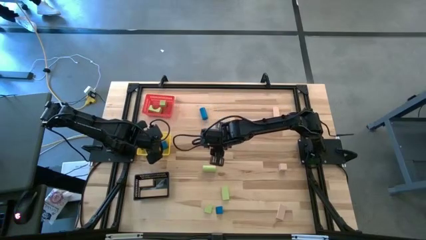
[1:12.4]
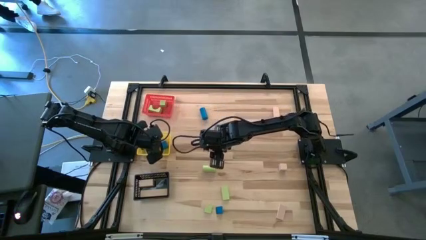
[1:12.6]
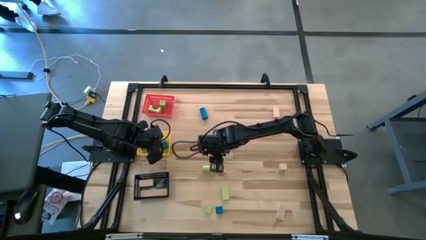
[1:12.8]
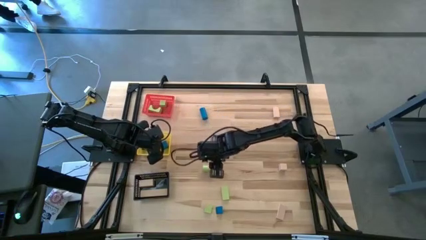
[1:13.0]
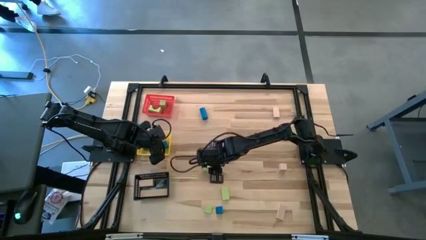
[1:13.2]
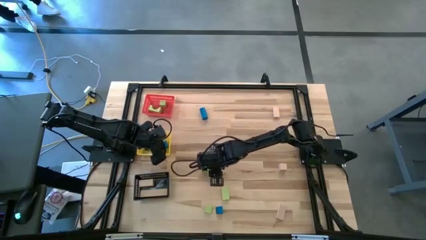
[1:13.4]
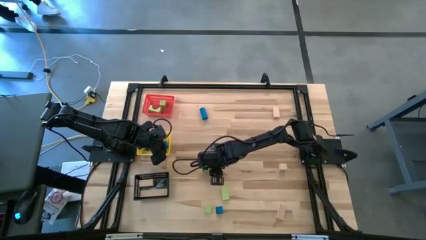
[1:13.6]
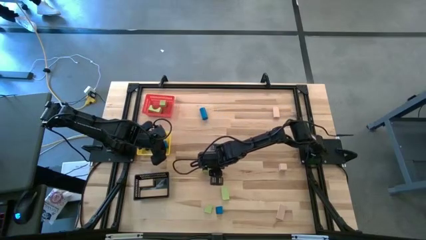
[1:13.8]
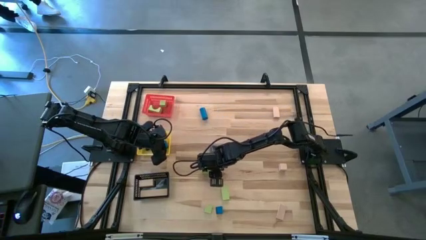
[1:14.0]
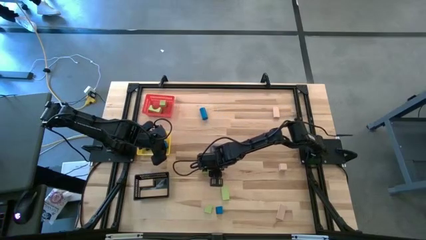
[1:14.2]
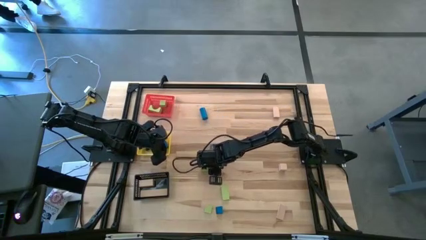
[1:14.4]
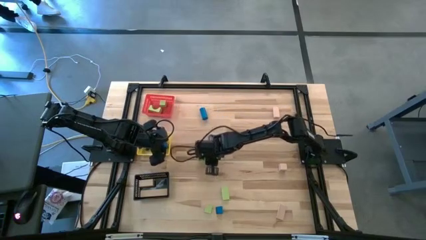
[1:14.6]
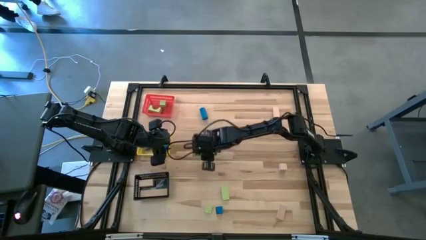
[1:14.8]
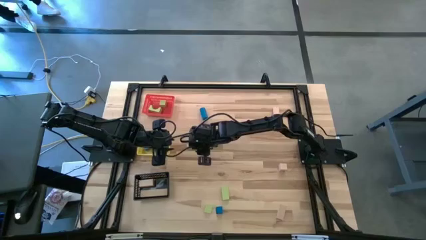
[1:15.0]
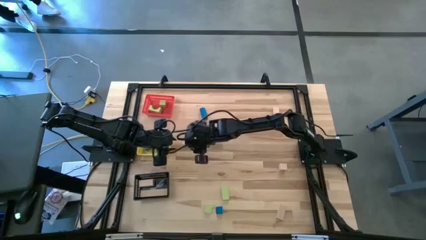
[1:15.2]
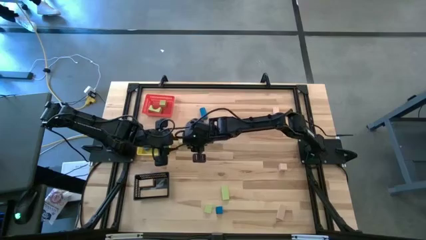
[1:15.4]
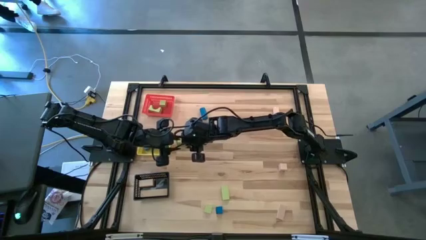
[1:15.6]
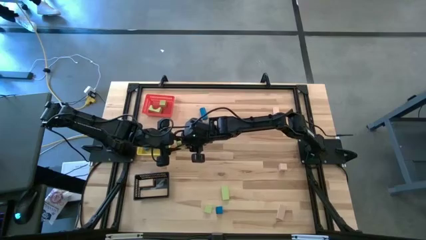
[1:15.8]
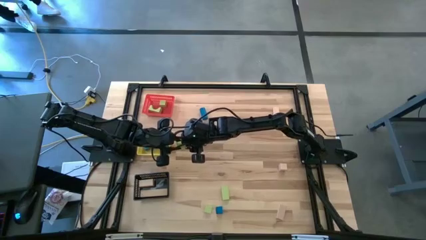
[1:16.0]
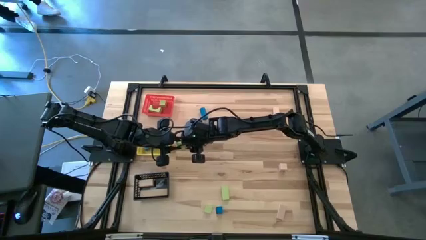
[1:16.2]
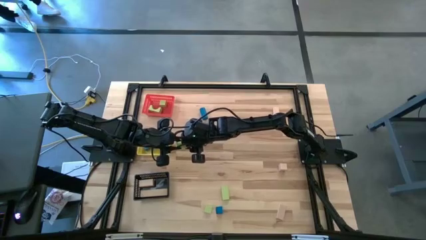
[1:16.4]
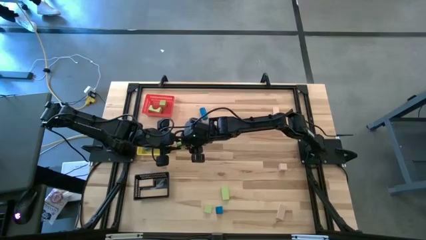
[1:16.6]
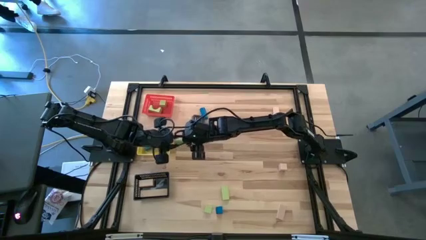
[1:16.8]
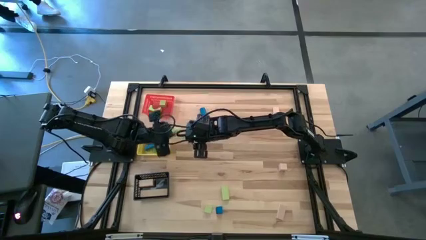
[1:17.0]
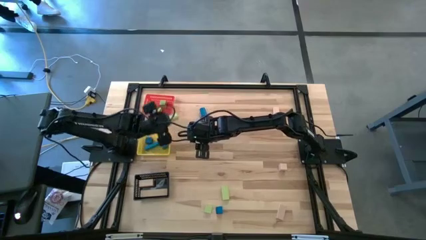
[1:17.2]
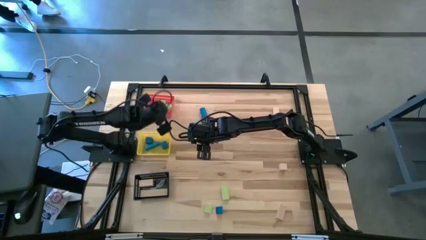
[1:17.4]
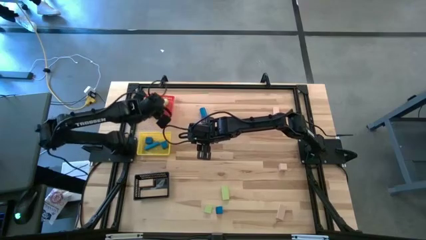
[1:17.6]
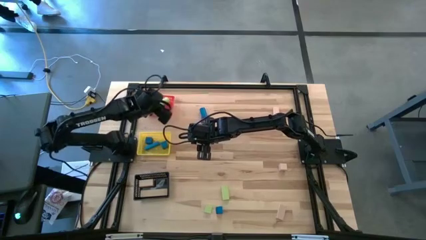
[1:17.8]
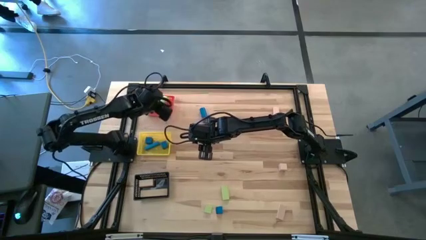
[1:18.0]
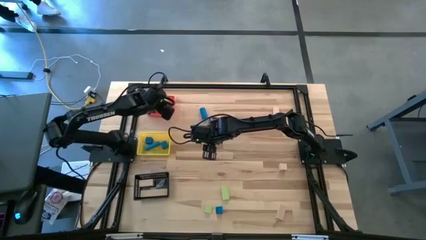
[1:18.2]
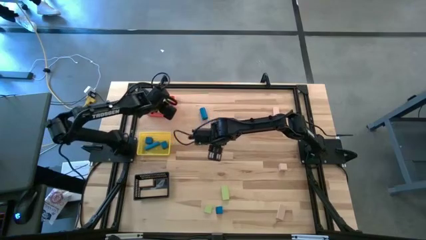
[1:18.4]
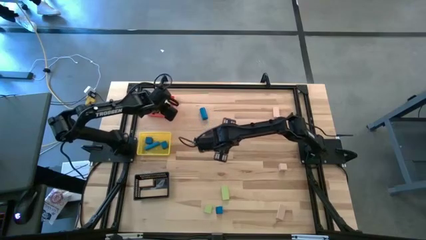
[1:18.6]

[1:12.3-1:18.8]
Task: Sort & place blocks by color
Put the cylinder green block into the red basket

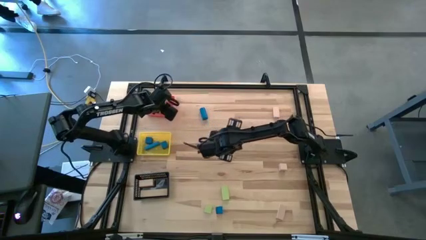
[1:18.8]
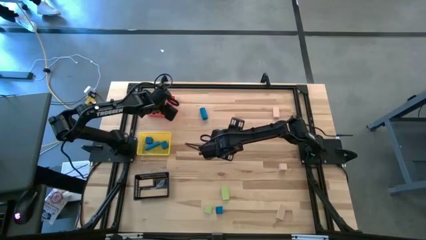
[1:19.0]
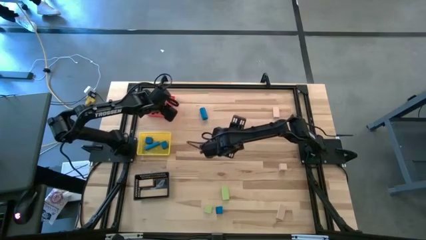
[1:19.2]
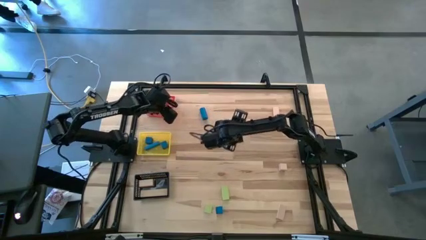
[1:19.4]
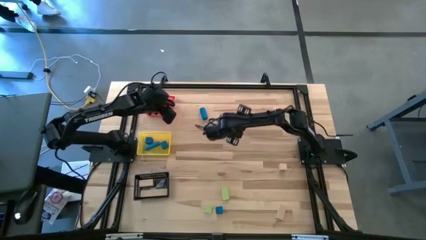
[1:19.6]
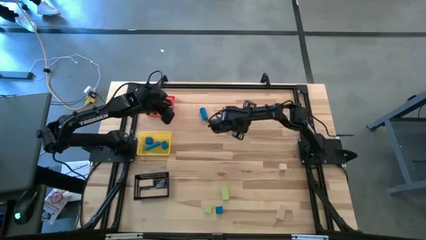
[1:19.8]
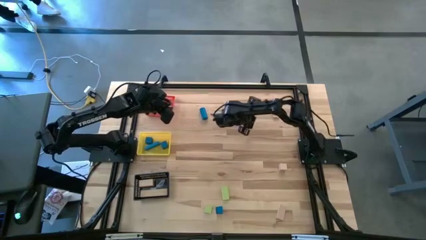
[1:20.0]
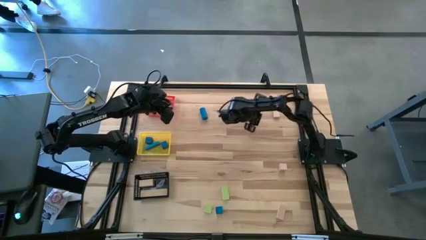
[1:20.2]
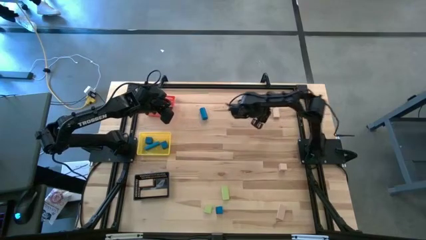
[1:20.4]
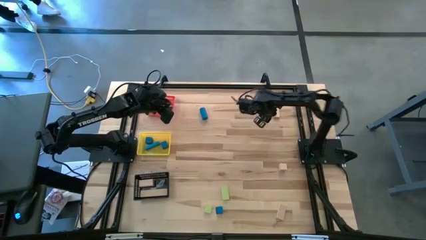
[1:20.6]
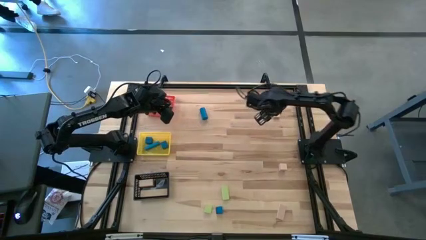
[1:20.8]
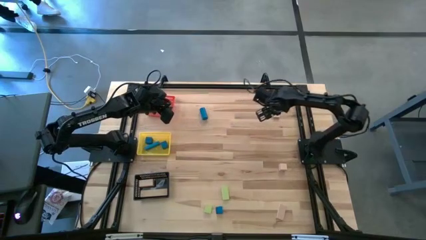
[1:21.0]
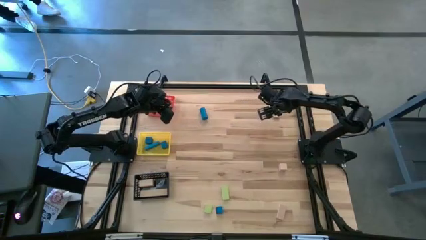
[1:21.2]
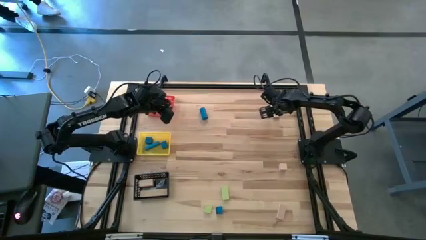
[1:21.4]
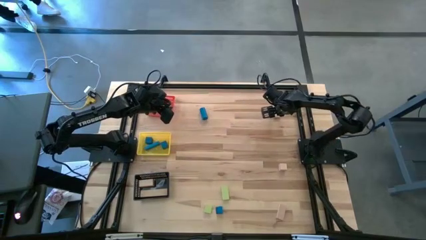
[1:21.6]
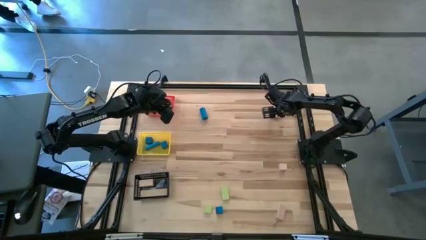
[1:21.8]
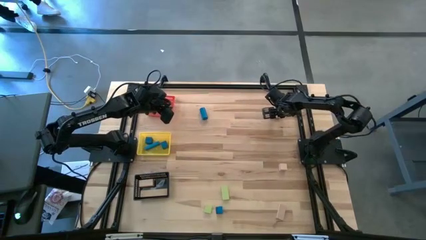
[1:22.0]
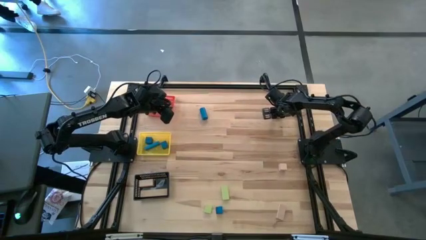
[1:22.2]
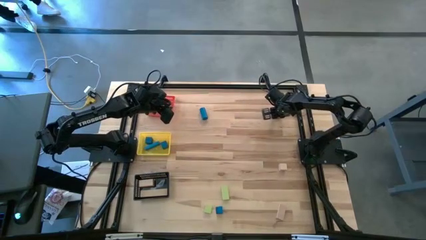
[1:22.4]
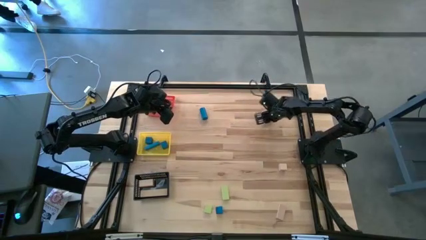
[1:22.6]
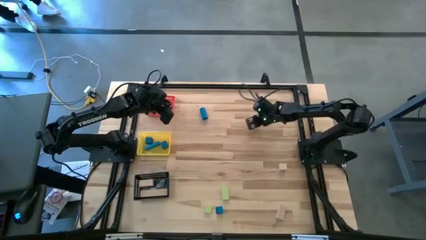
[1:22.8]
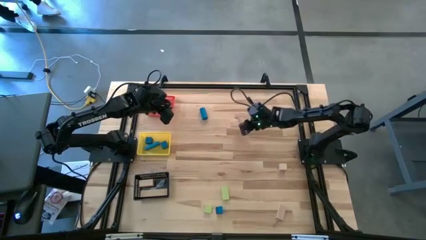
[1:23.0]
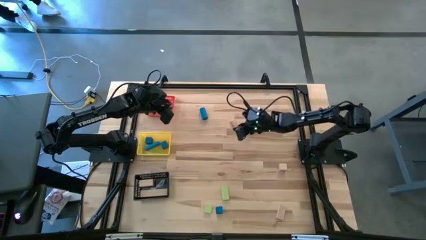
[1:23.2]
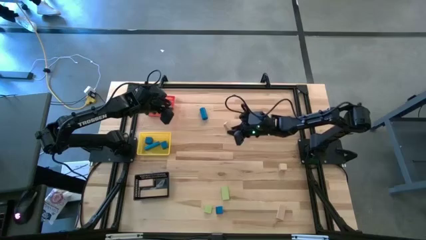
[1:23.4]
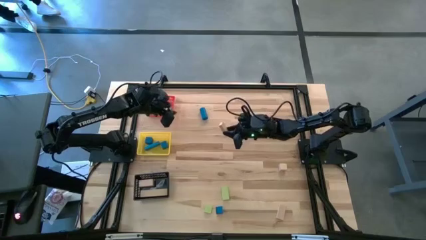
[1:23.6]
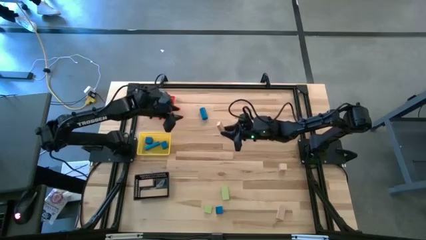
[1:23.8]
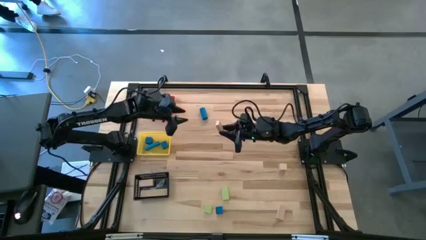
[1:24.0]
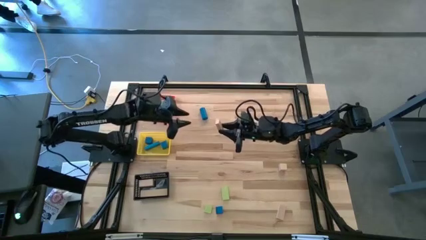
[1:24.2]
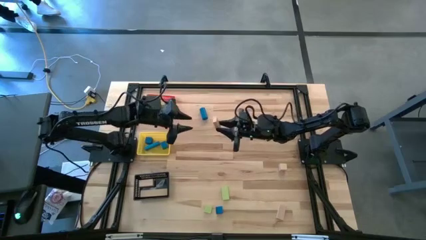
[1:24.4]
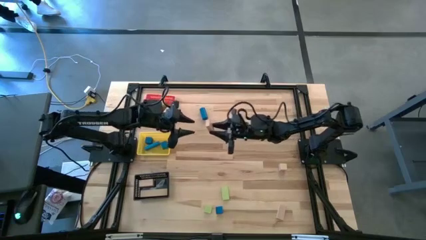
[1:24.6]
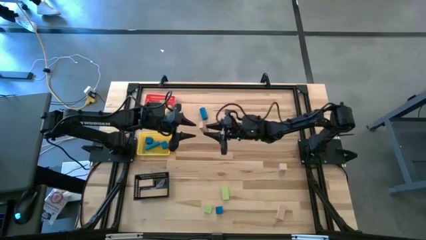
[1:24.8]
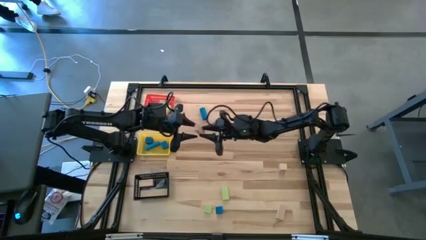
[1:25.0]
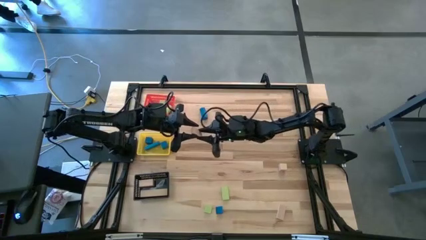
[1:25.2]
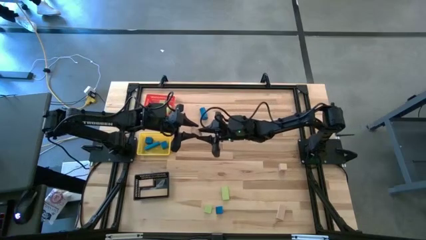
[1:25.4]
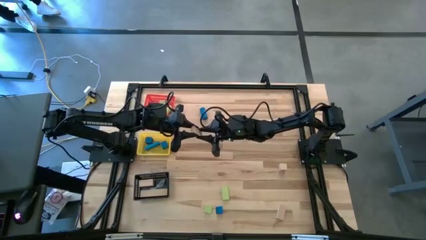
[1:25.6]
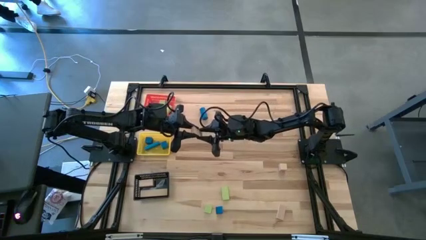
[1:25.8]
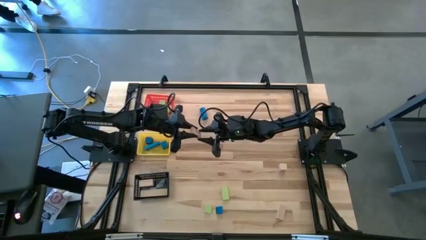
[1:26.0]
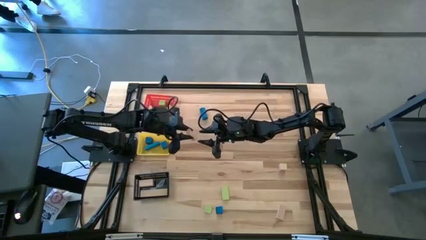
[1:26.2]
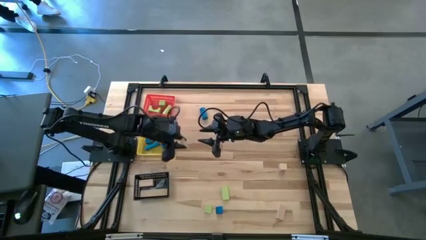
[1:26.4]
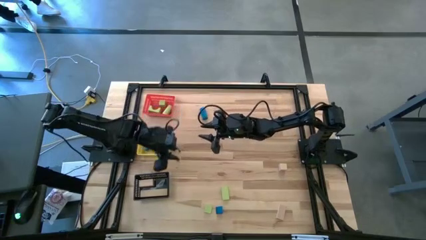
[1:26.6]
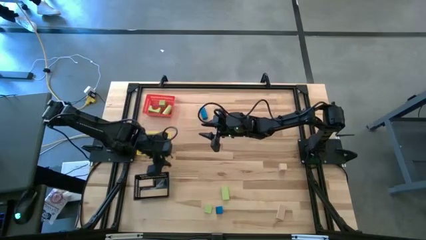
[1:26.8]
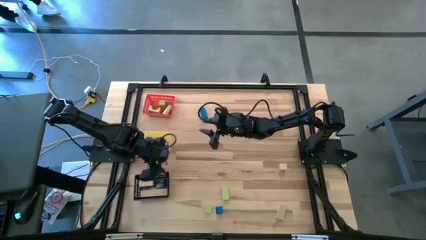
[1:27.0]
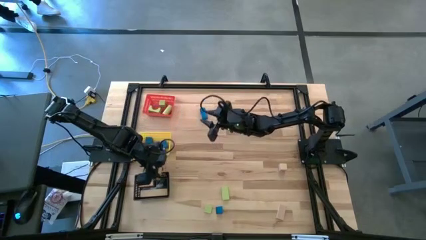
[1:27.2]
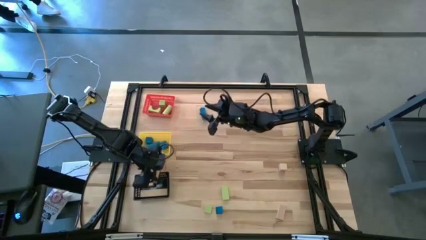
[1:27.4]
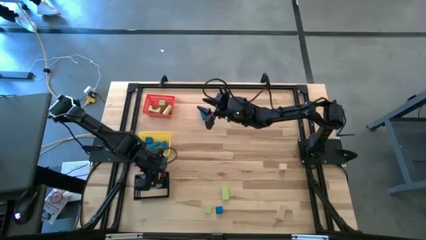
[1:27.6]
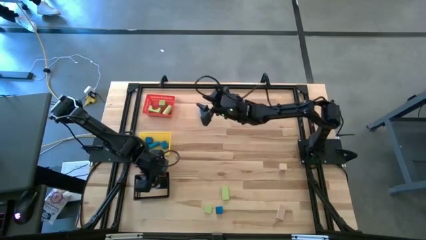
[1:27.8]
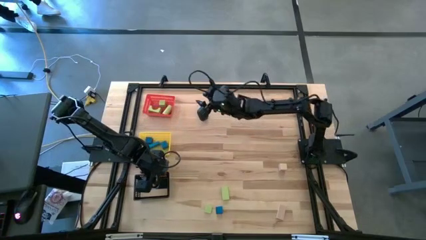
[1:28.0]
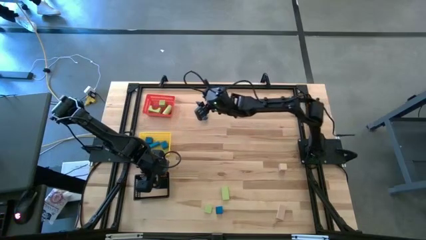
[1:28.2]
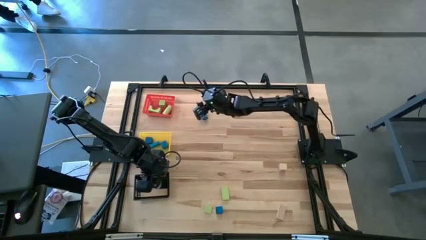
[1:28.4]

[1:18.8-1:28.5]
Put the rectangular wooden block into the black basket
